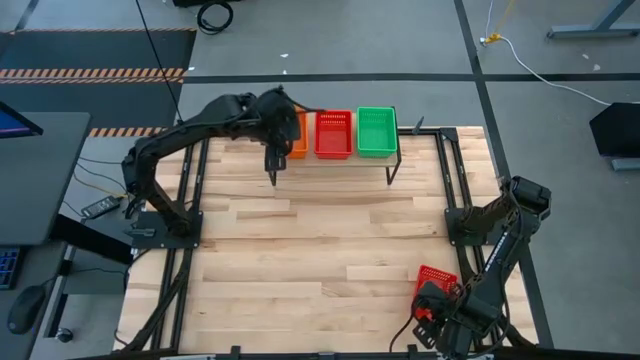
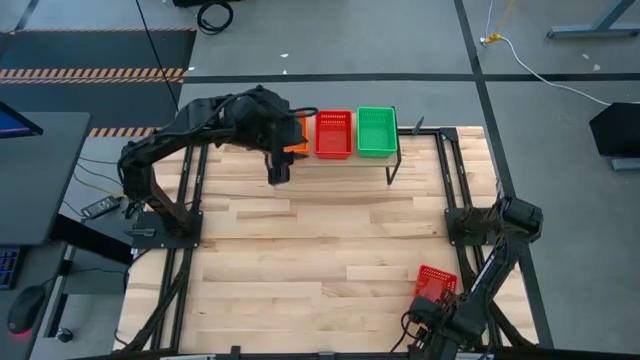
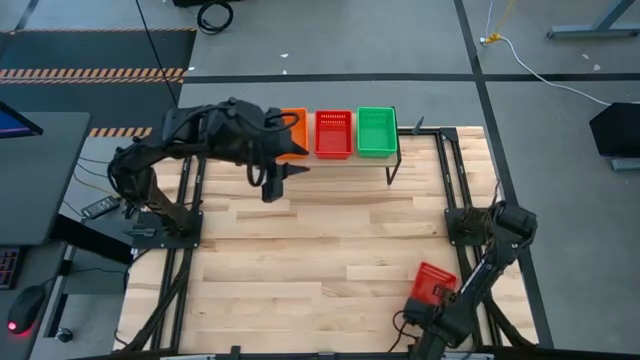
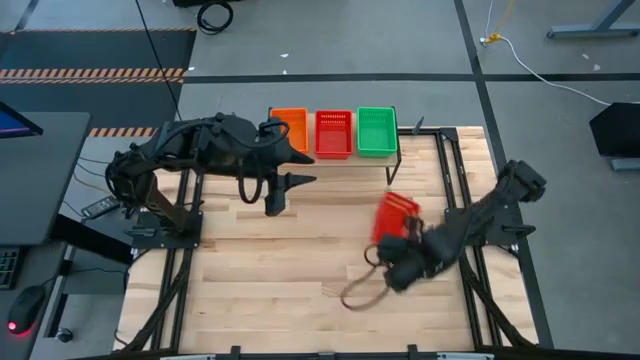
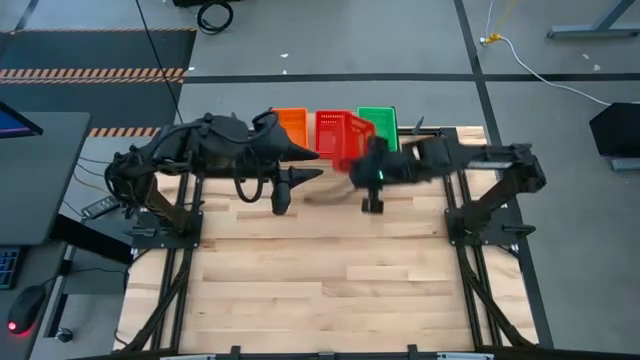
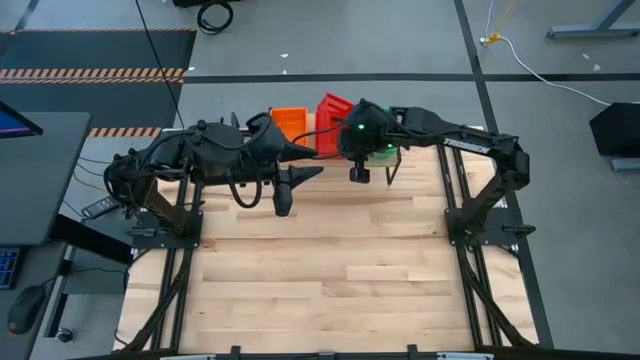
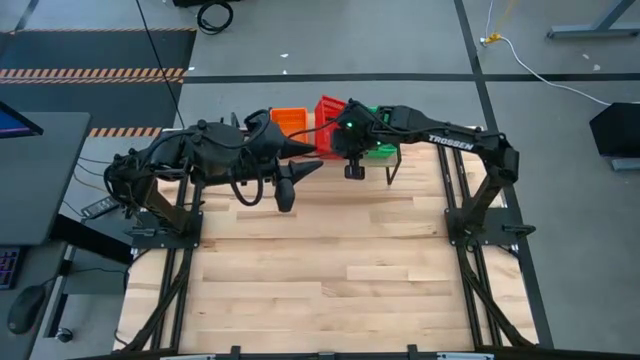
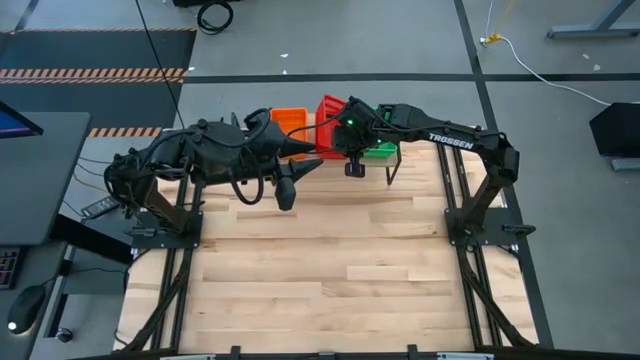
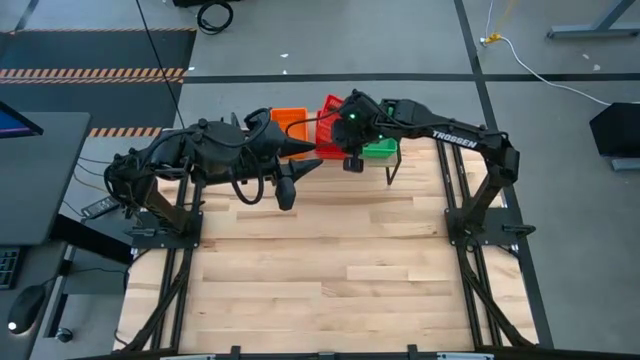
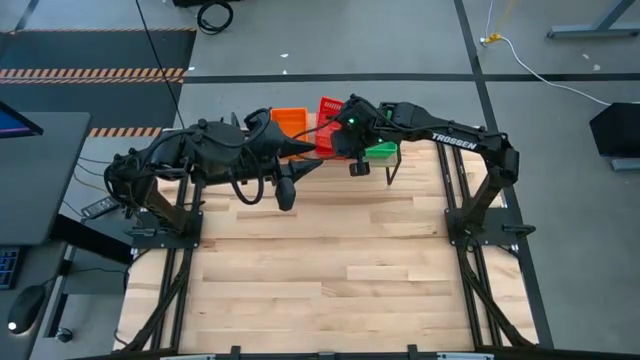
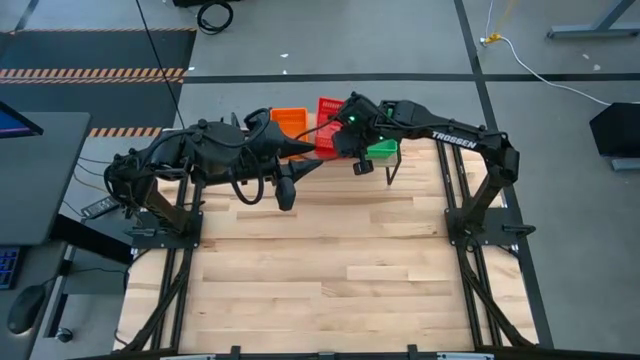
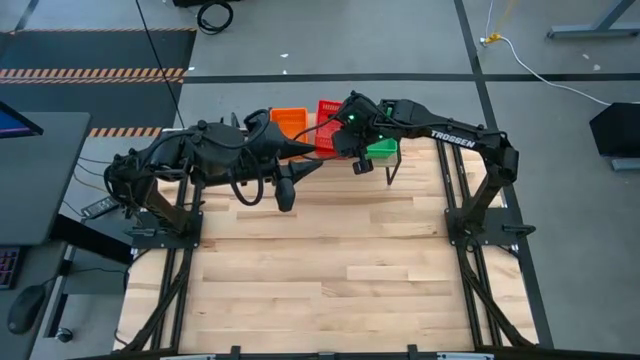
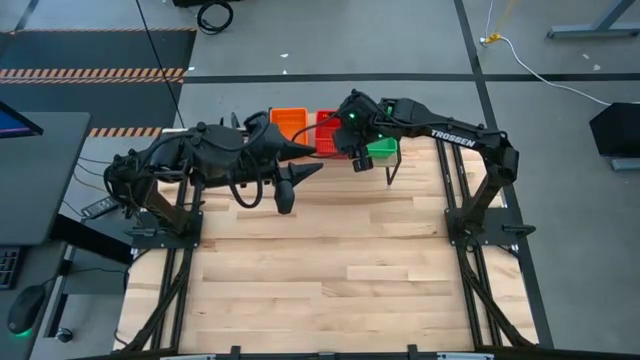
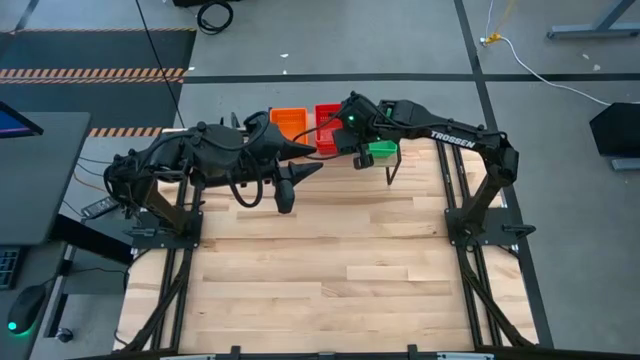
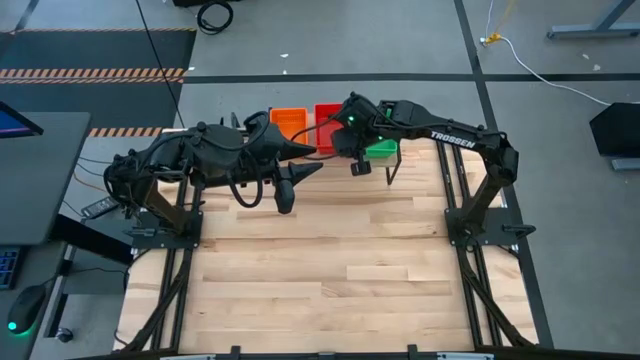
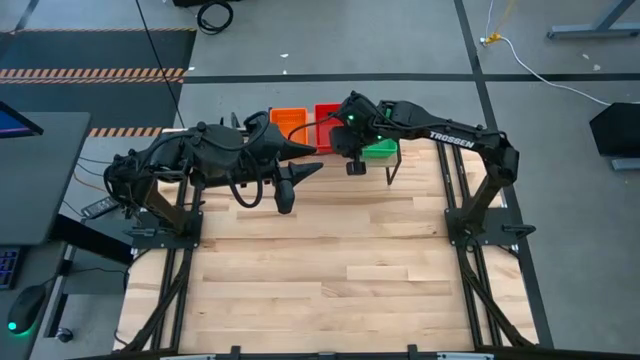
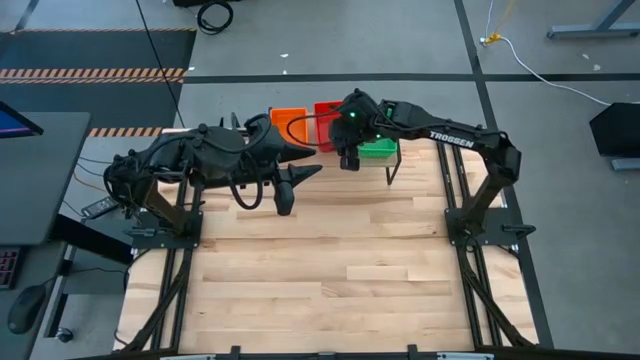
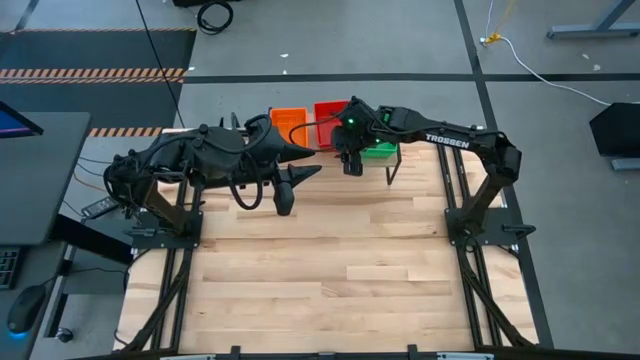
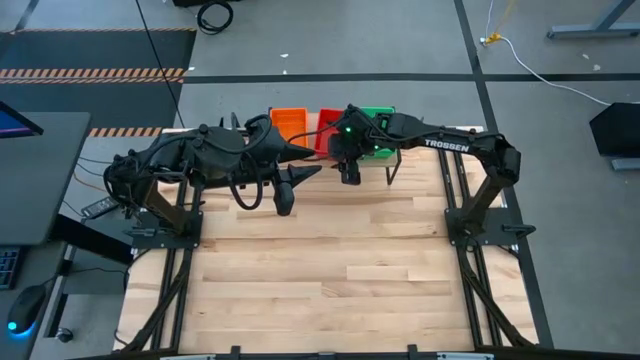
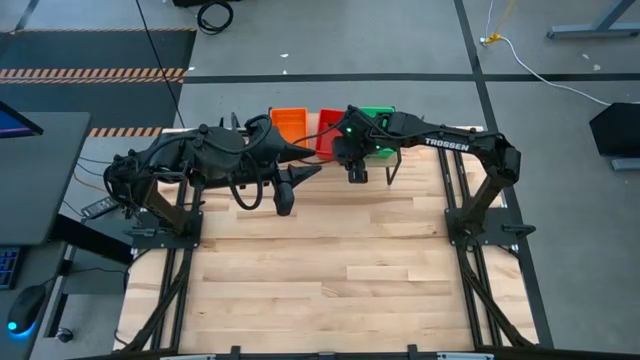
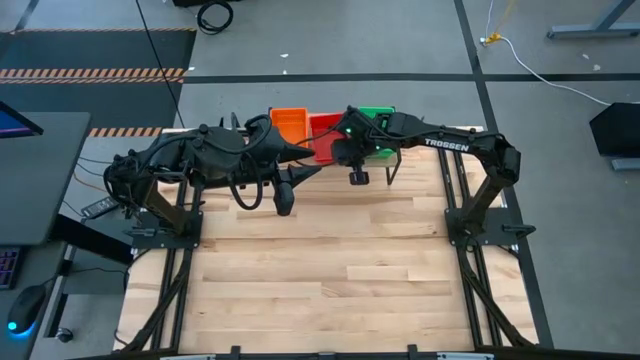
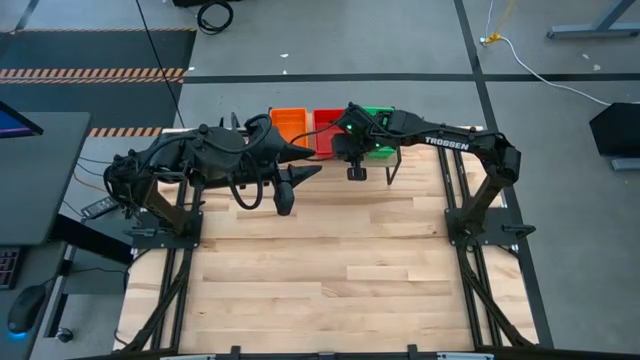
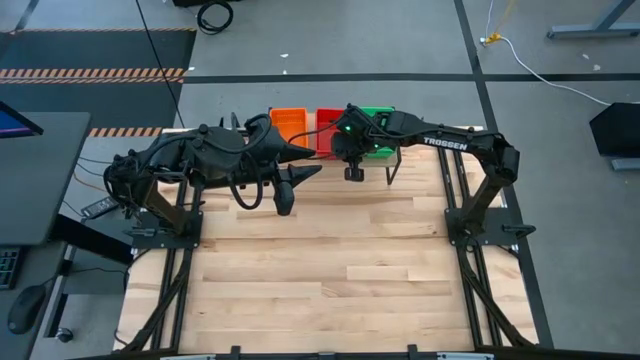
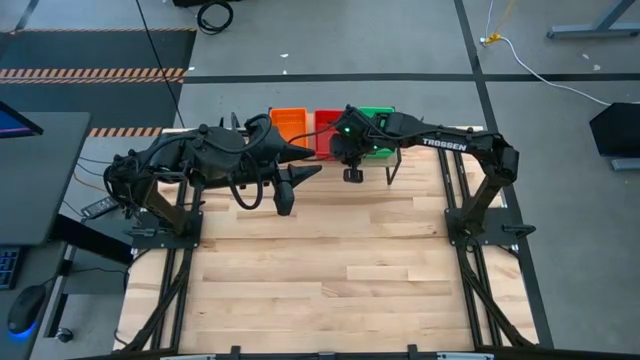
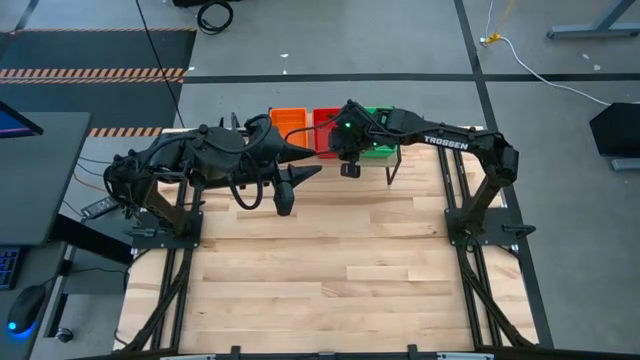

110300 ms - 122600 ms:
Task: Stack baskets on shelf by color
Stack the red bin on top of the other red bin on the shelf

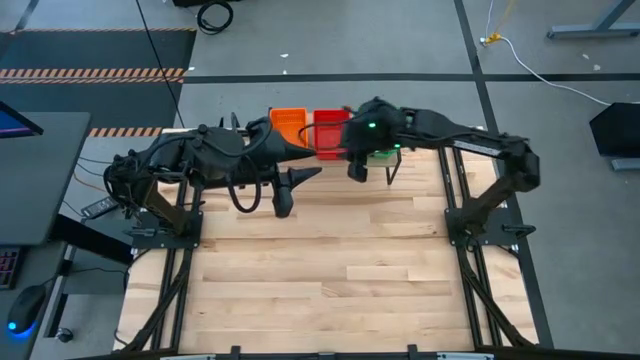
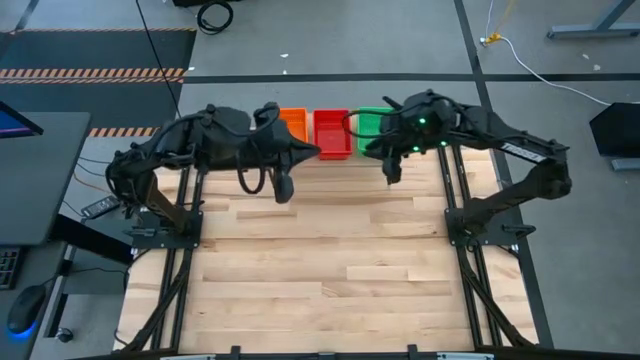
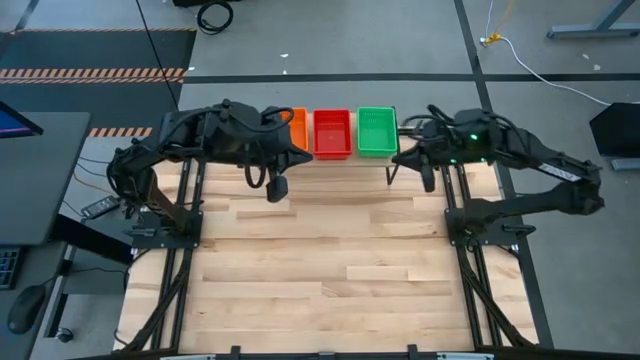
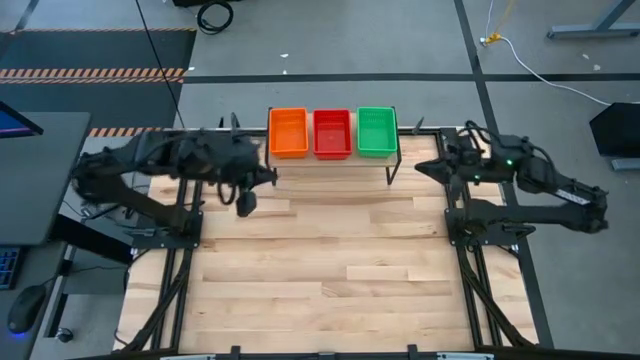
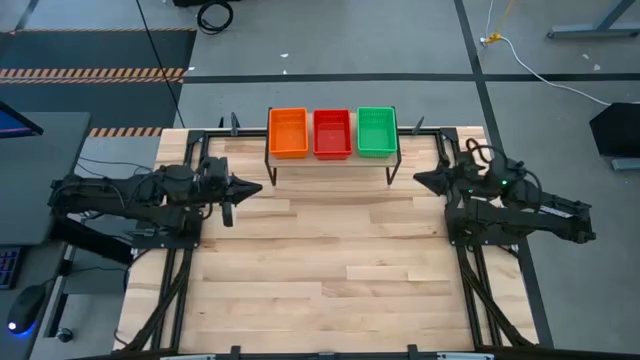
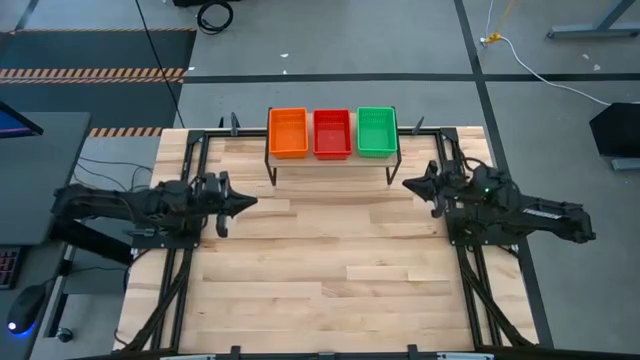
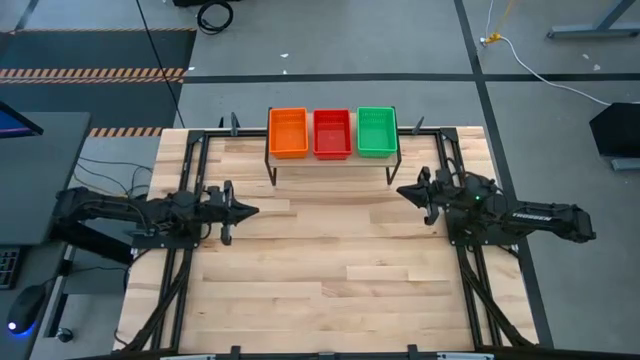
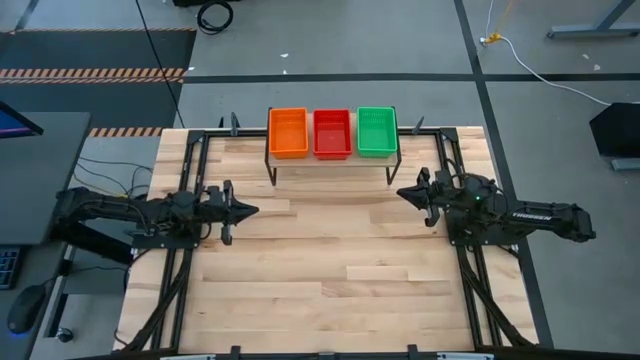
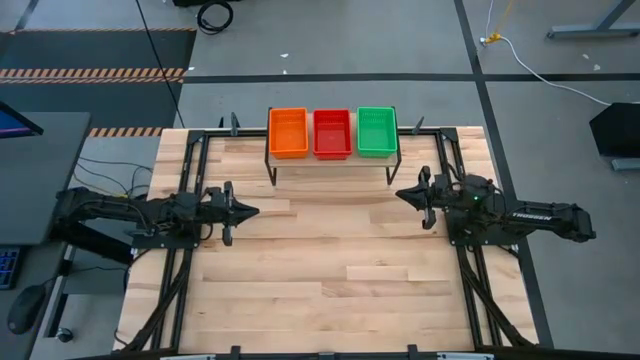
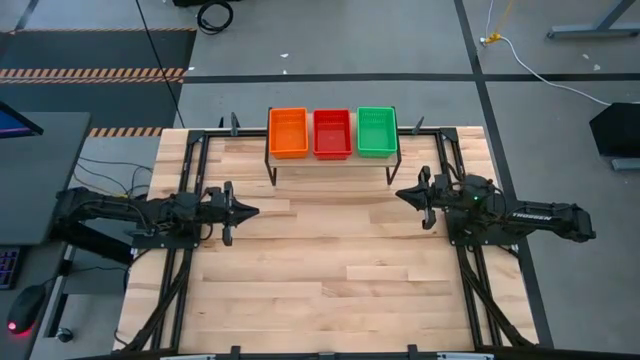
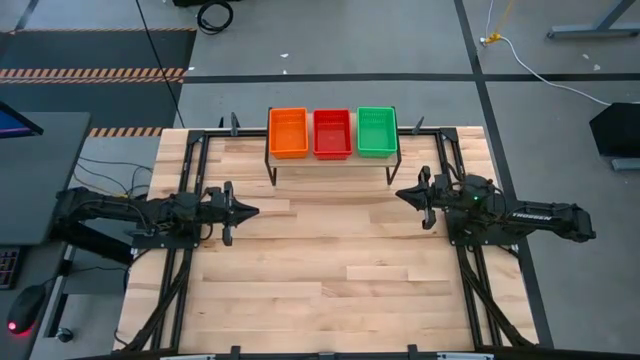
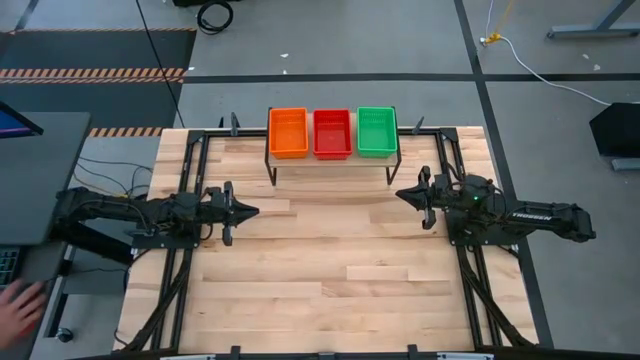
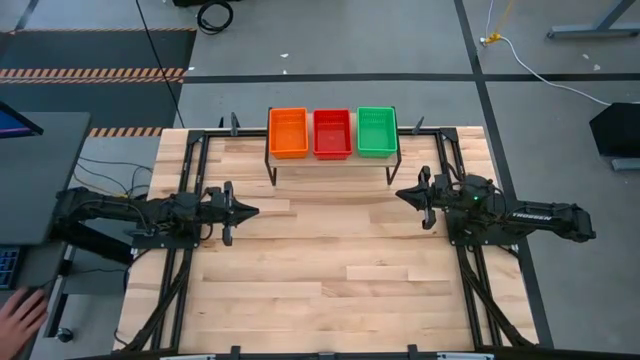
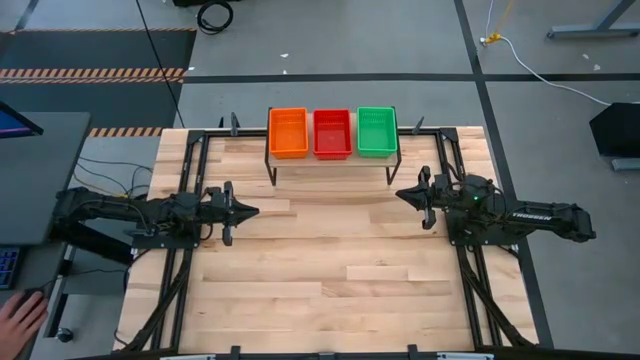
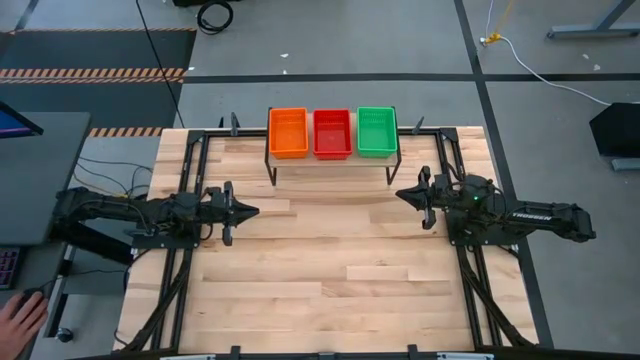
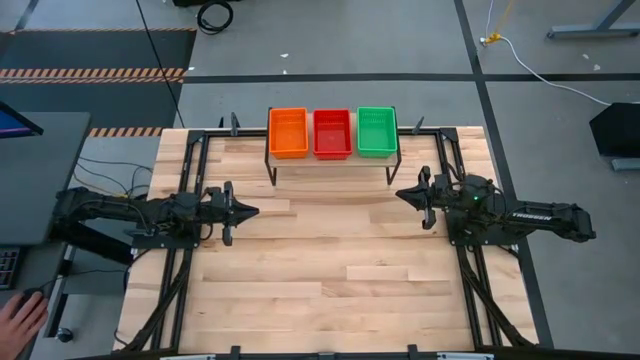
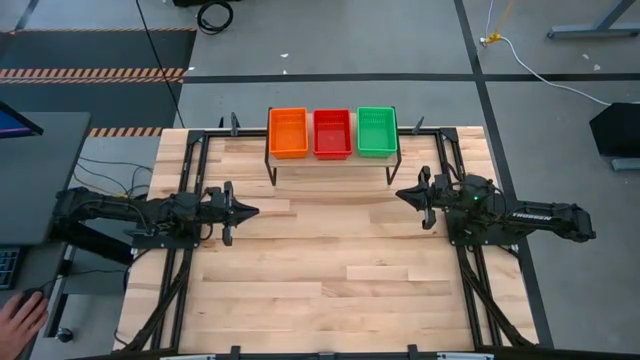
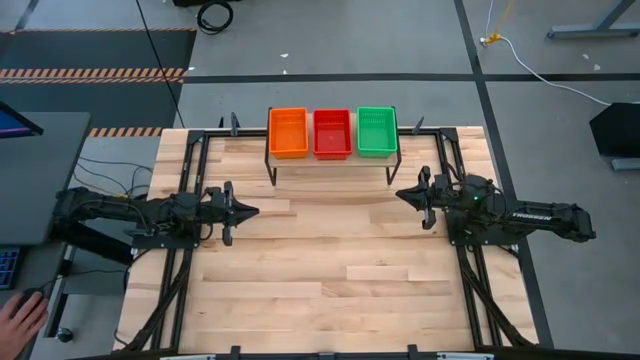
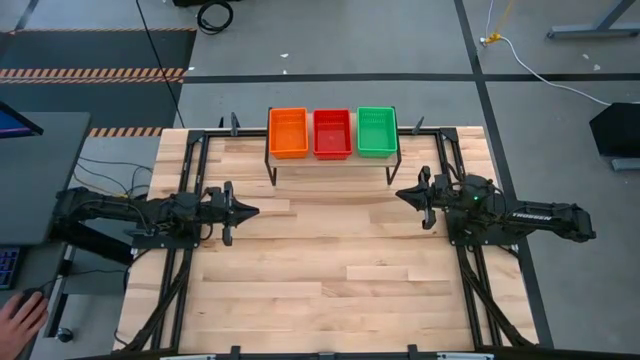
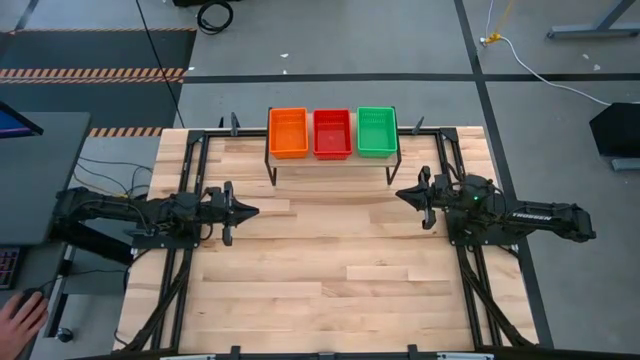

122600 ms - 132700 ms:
Return to Home Position
